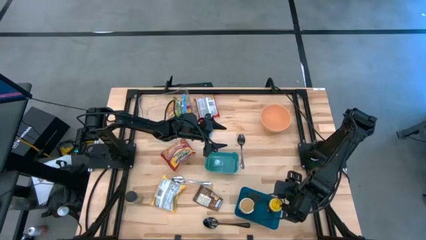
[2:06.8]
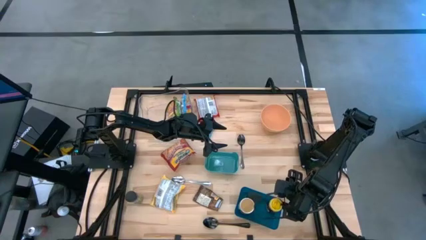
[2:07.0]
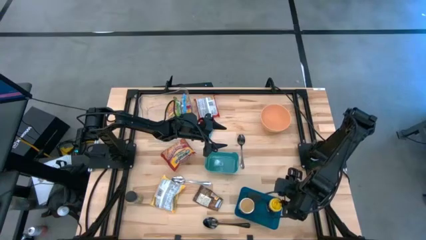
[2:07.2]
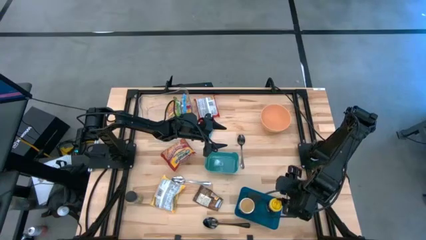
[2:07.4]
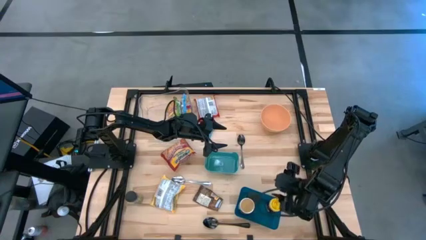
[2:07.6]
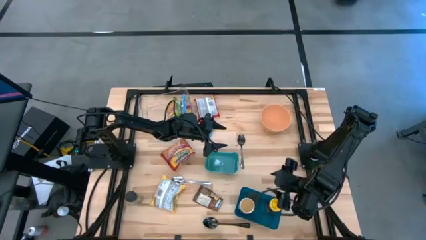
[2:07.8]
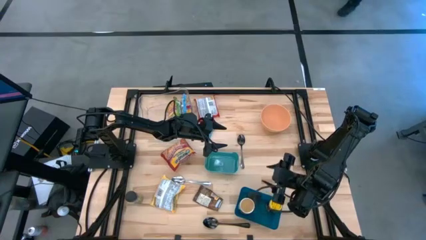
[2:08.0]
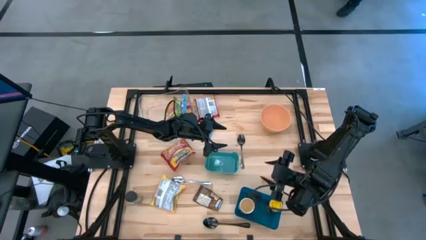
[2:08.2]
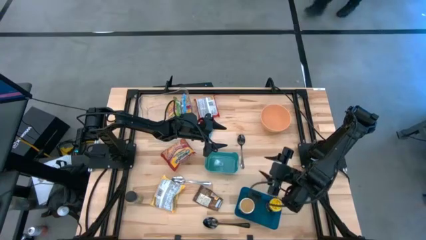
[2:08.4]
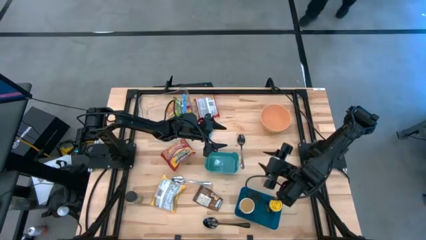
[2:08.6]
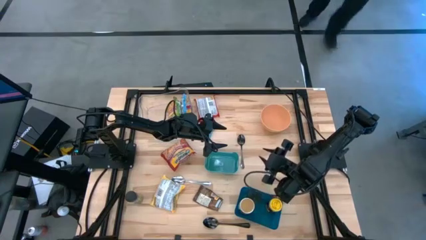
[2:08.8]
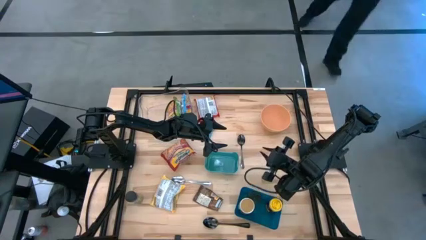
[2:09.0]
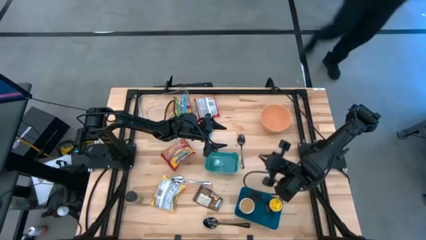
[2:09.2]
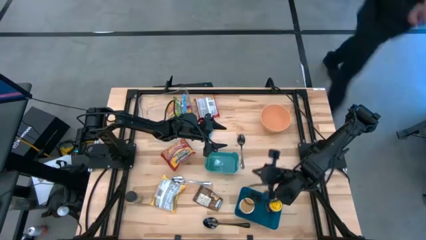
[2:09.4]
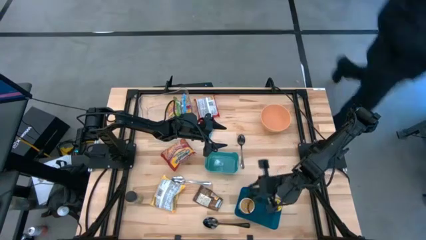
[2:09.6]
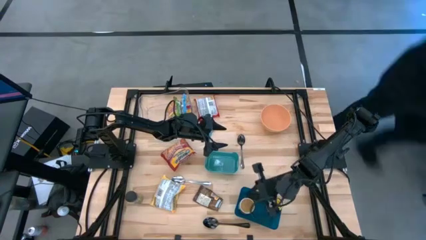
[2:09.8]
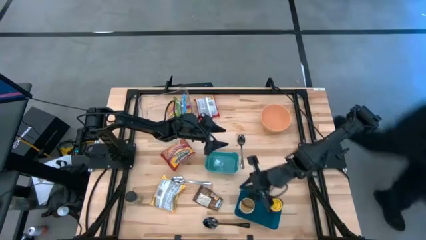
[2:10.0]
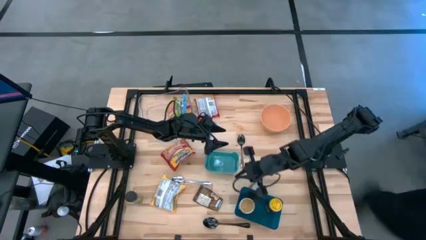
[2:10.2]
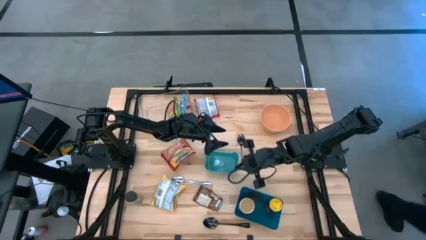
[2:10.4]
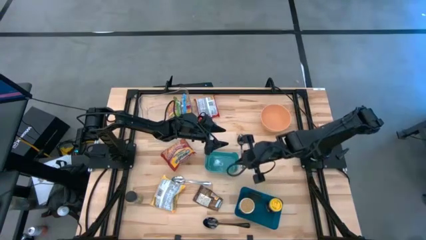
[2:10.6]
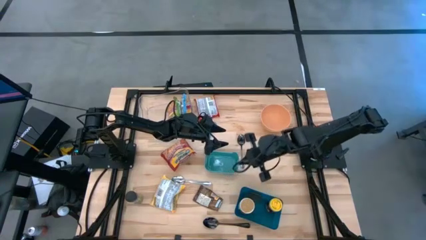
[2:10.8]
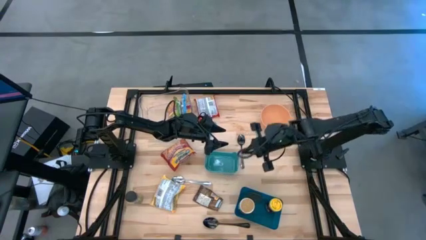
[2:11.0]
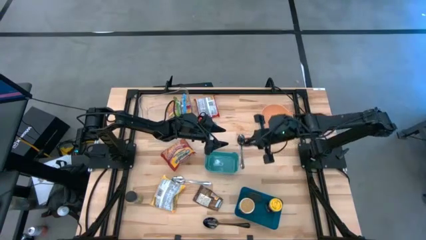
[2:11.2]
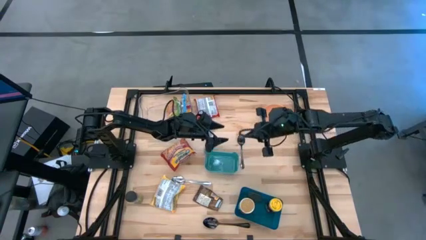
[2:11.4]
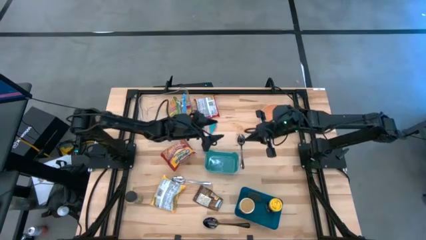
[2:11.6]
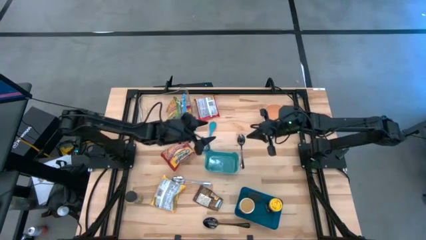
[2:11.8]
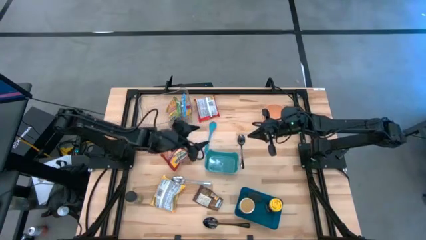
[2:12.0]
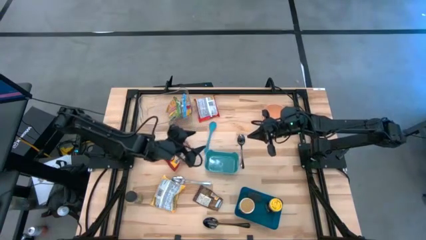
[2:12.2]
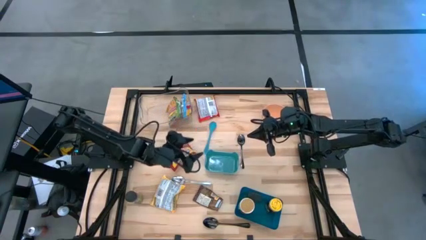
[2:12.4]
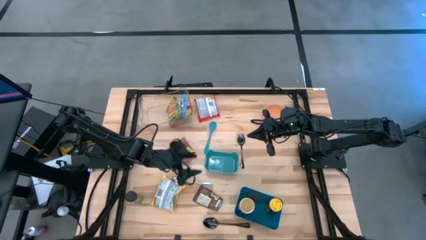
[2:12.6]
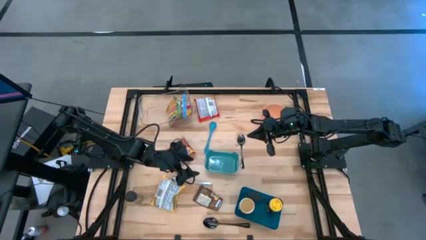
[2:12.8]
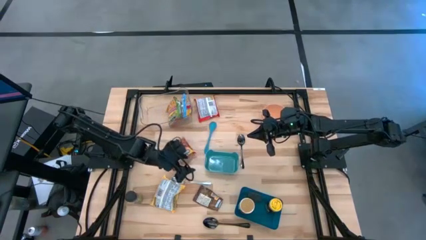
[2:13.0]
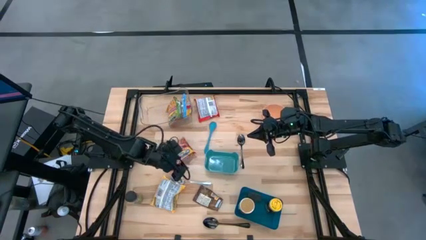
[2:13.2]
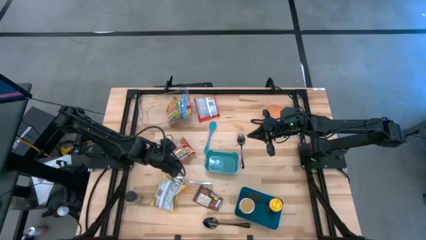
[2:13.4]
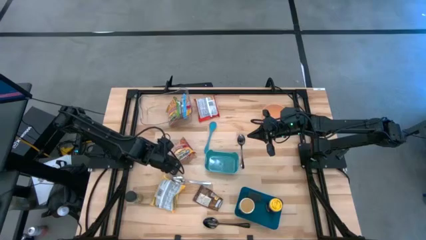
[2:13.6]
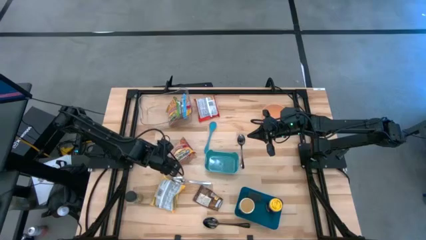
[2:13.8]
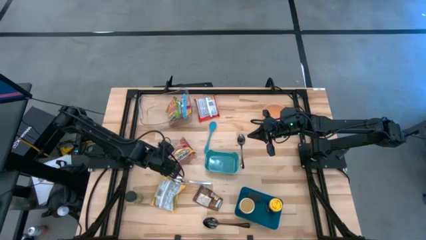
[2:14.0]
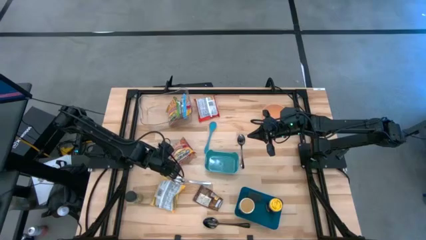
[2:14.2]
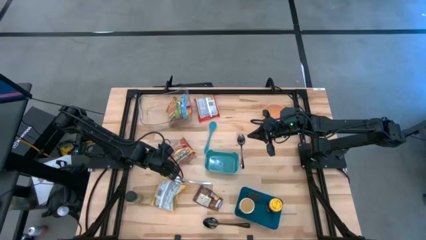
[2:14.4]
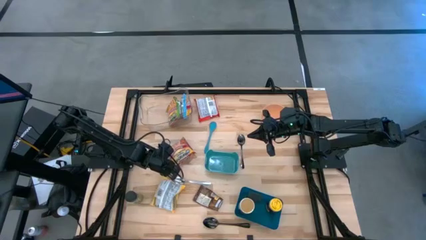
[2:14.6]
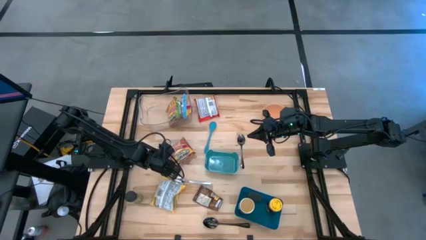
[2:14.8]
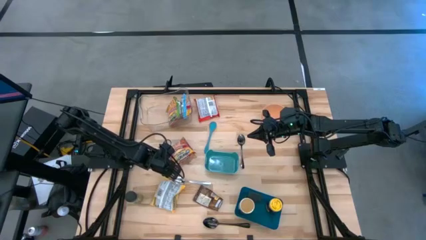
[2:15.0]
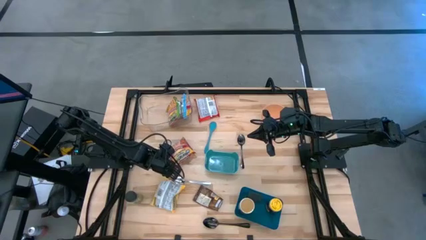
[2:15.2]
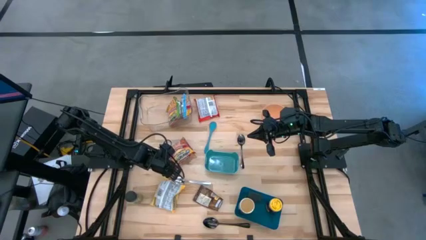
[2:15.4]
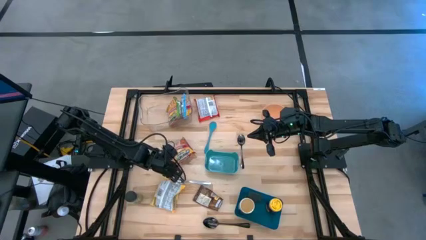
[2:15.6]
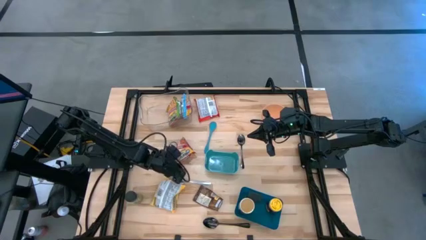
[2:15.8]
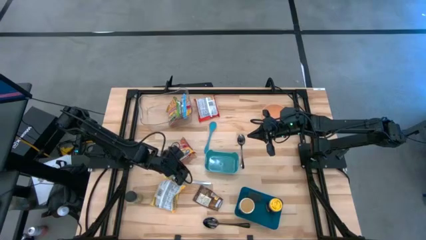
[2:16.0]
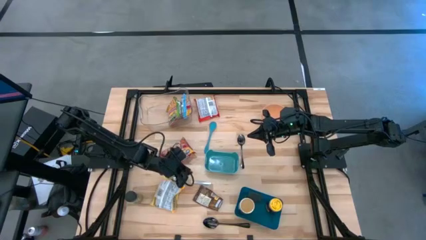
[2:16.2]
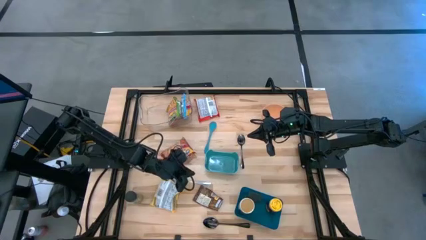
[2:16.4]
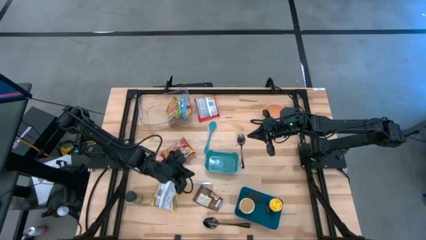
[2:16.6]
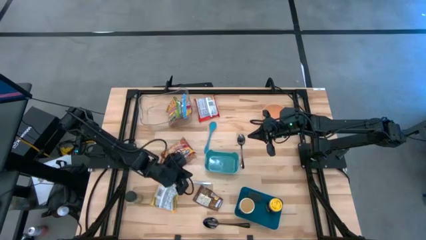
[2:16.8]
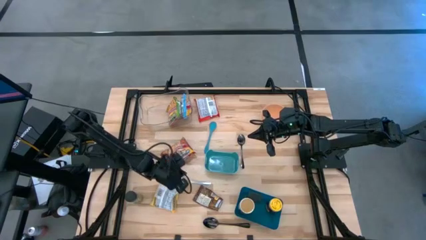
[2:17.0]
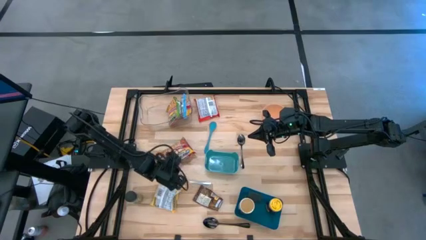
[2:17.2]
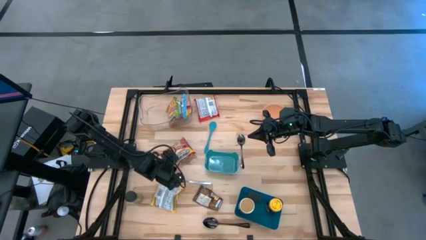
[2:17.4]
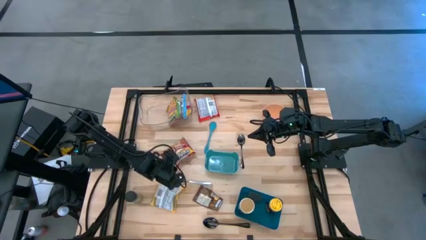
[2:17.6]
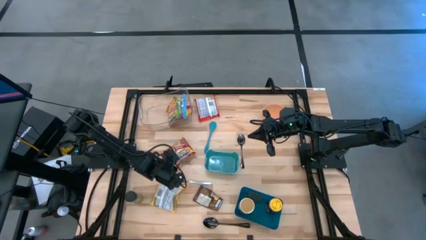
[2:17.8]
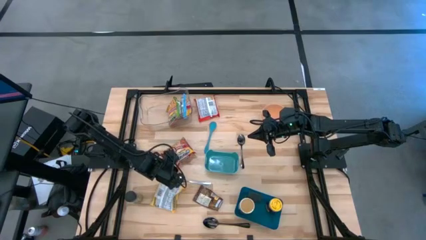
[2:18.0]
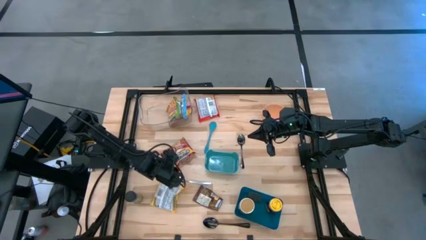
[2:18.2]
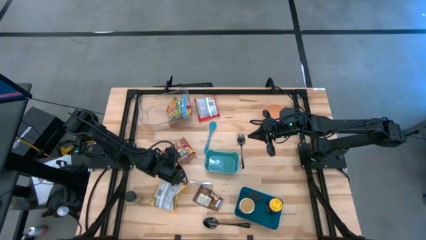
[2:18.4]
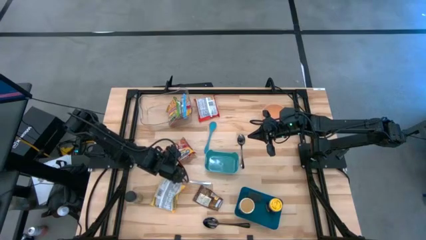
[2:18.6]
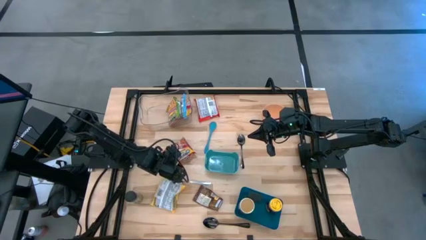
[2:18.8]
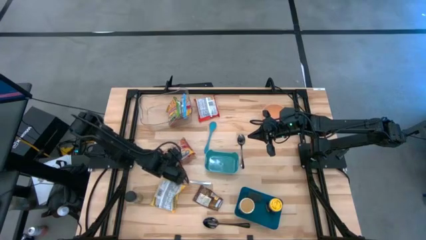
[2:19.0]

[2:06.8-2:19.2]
Task: Pick & Place Food Item
Put the dark red noodle pack into the transparent bin
